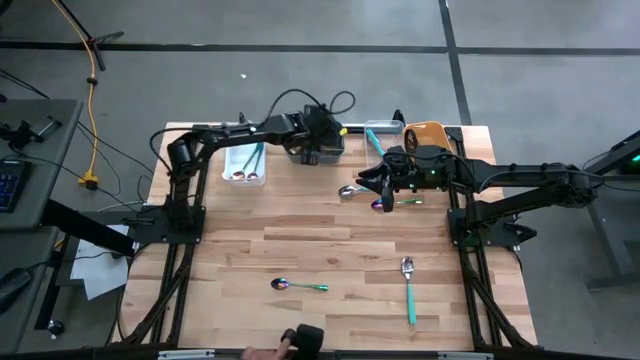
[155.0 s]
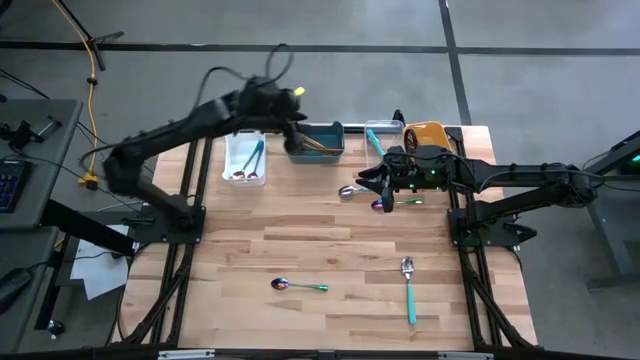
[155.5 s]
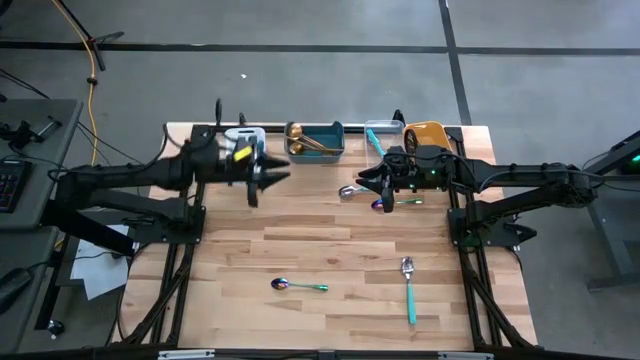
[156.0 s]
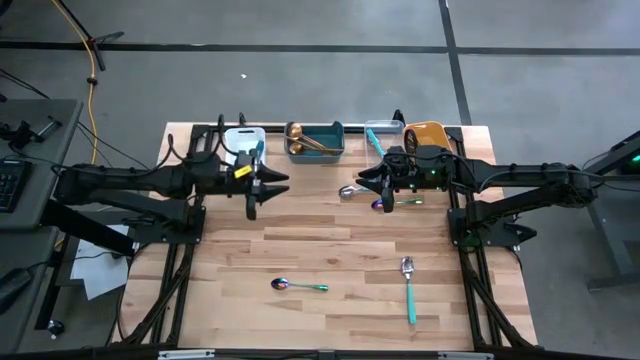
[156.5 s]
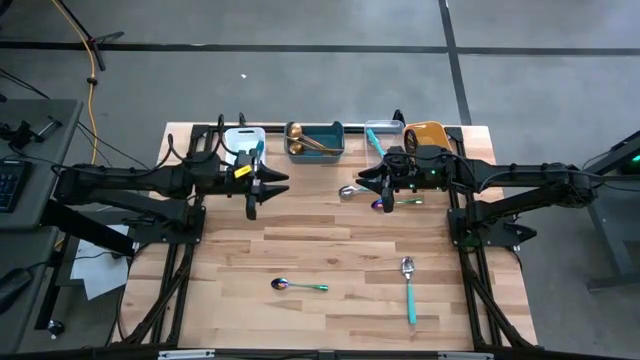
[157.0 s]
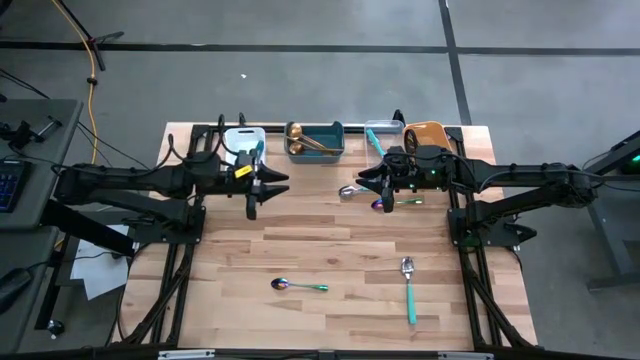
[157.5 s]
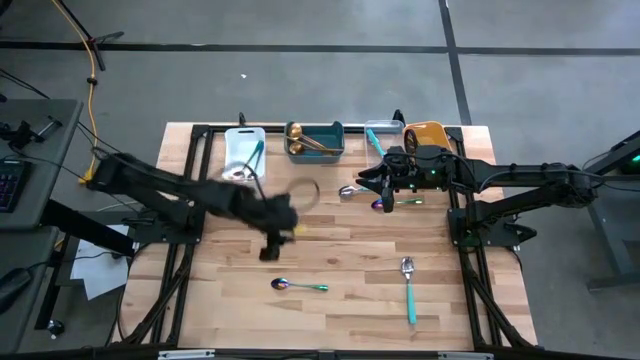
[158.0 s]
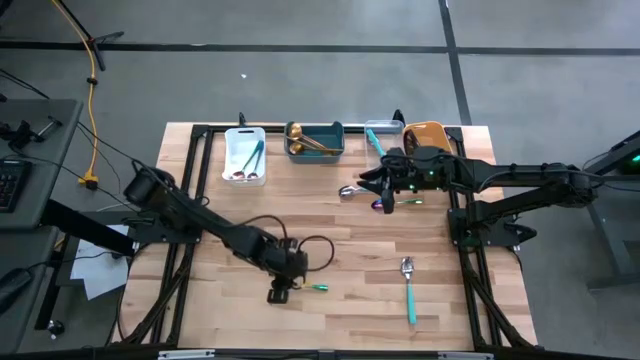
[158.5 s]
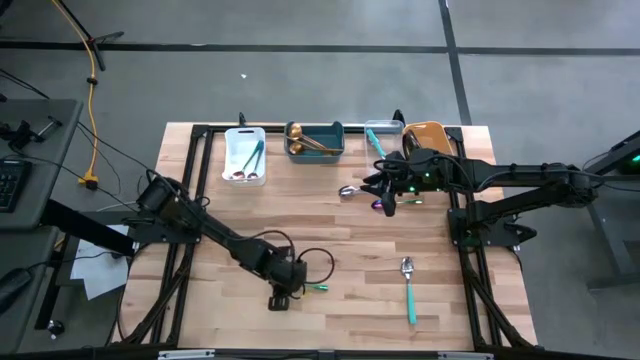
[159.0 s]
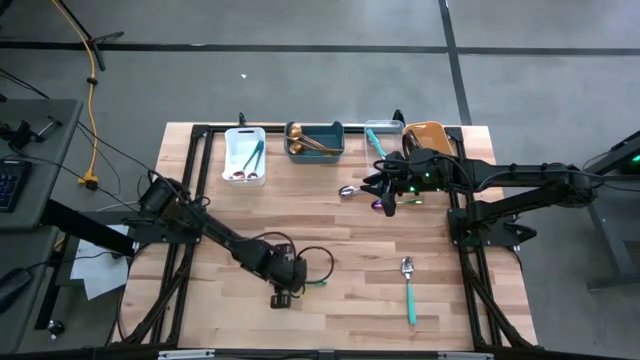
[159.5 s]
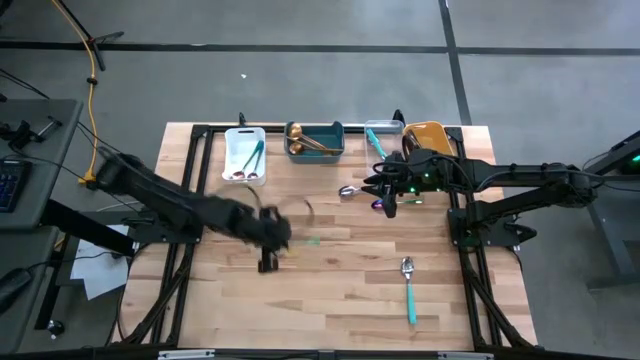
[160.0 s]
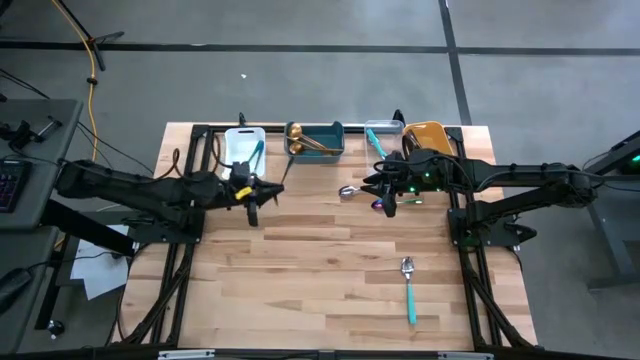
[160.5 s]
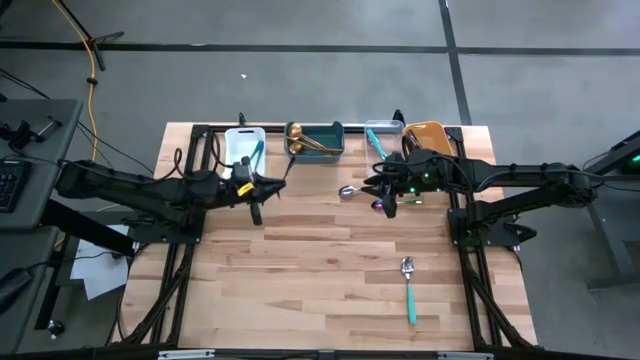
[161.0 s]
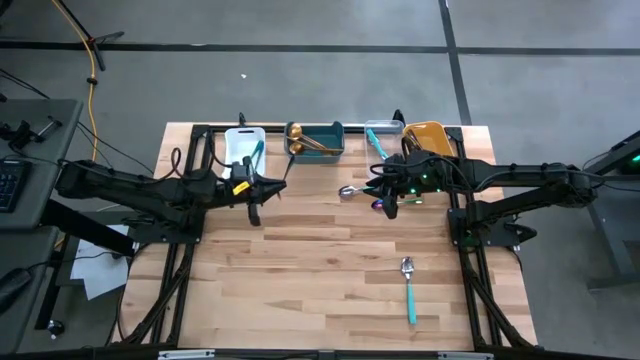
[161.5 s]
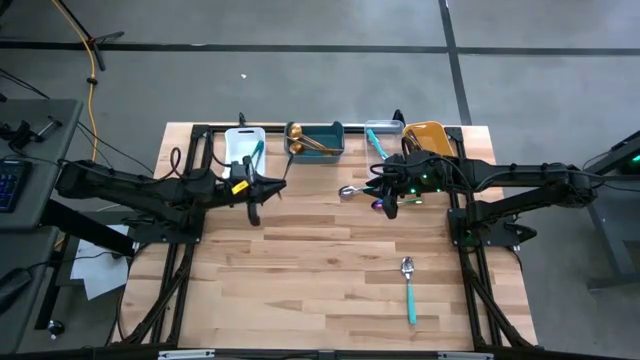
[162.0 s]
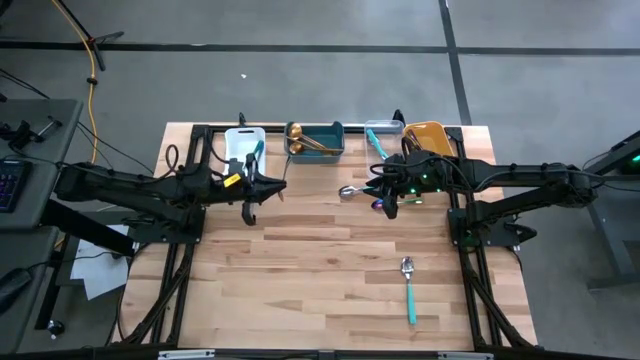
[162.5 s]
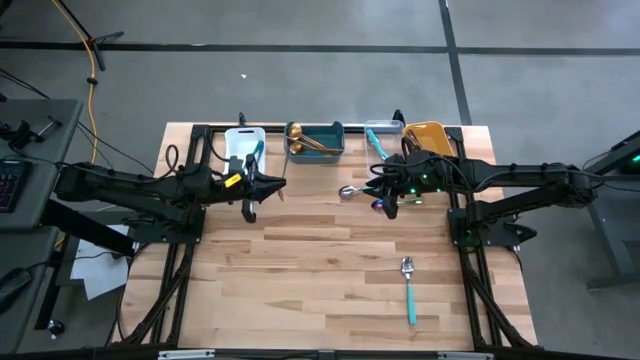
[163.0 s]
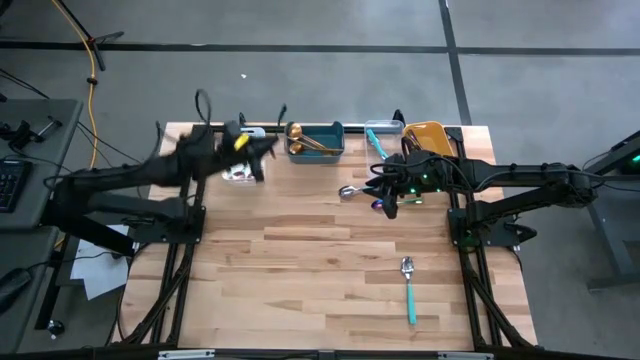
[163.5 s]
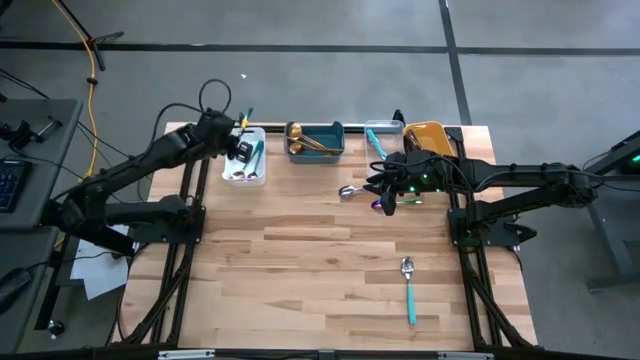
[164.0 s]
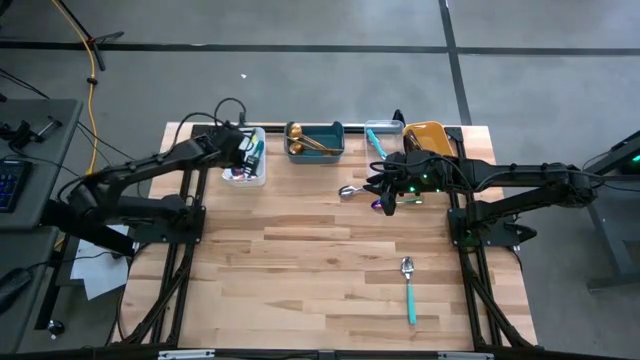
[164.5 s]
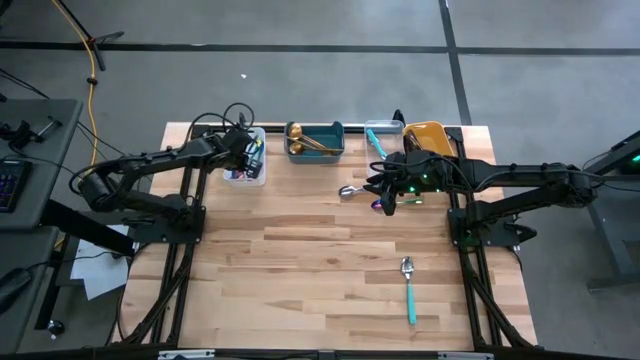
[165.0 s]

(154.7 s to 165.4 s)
Task: Sort silverware by color (type)
Put the green spoon into the white bin

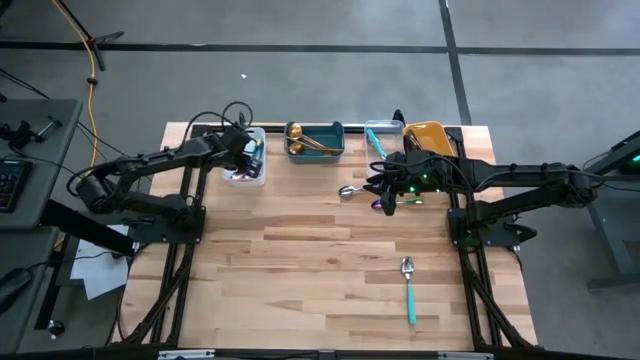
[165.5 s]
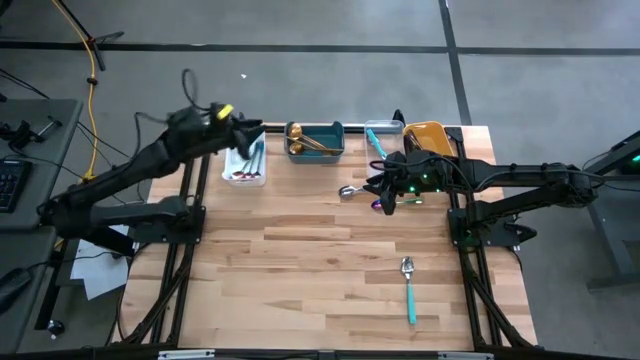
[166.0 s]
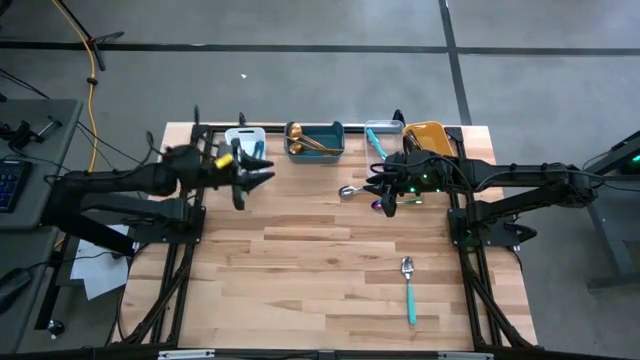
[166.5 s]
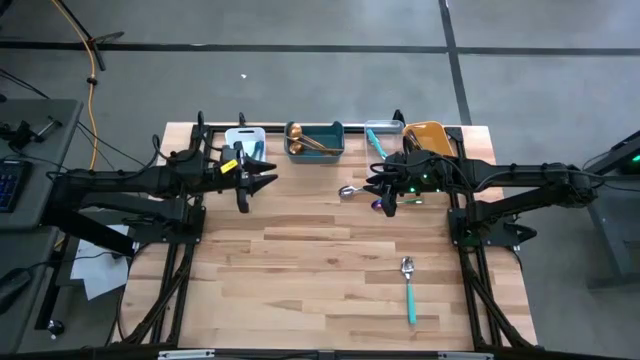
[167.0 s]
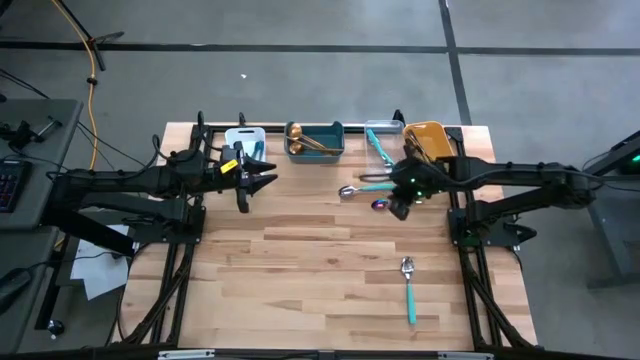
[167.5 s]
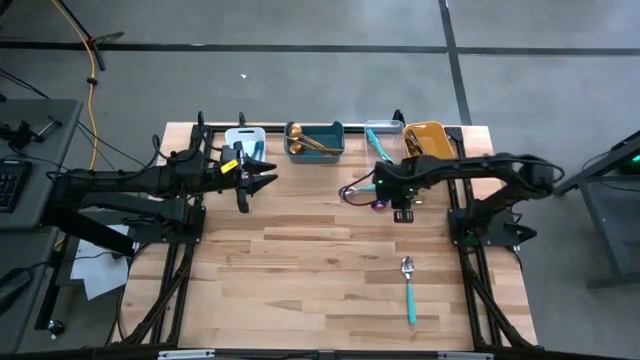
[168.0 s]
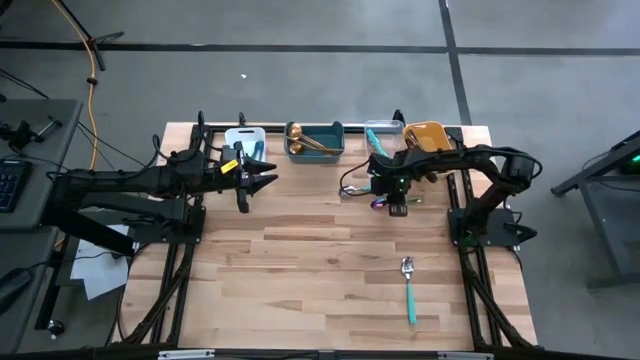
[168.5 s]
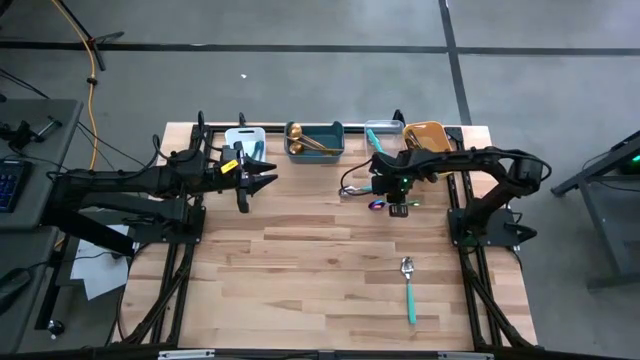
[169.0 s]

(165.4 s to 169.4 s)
Put the green spoon into the white bin

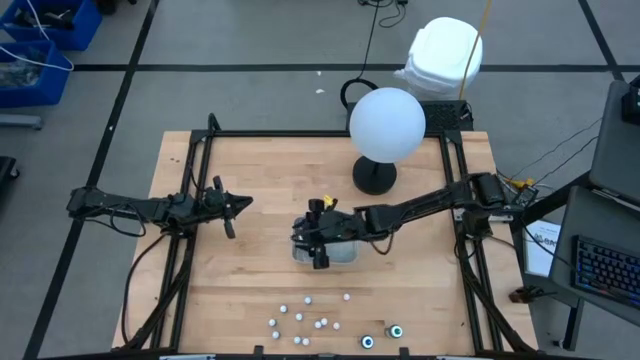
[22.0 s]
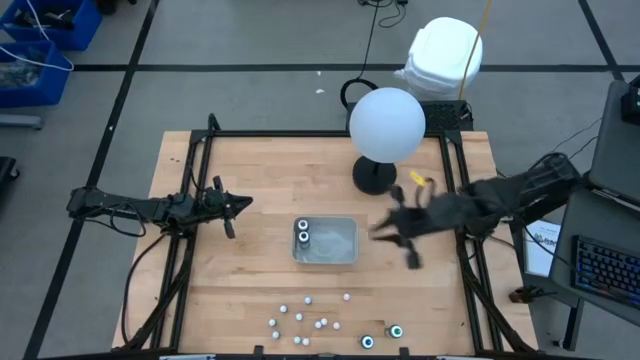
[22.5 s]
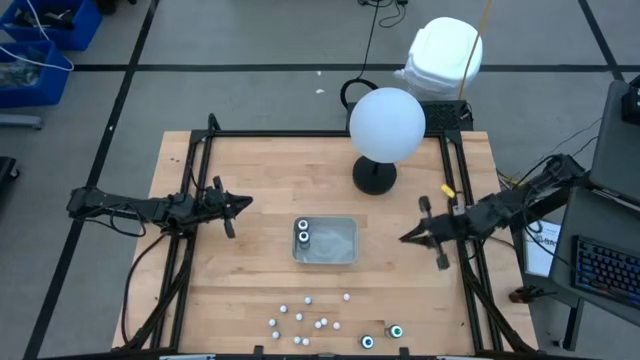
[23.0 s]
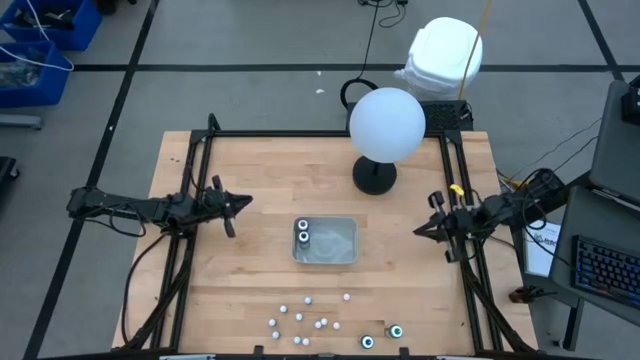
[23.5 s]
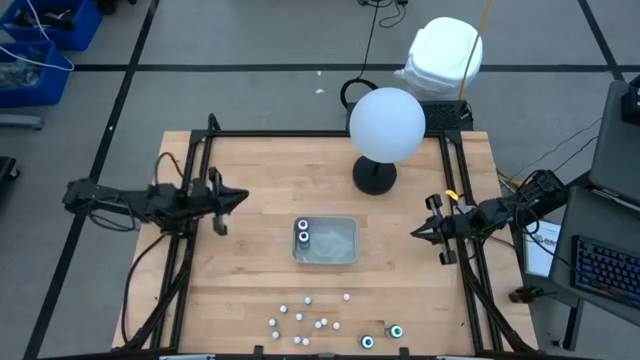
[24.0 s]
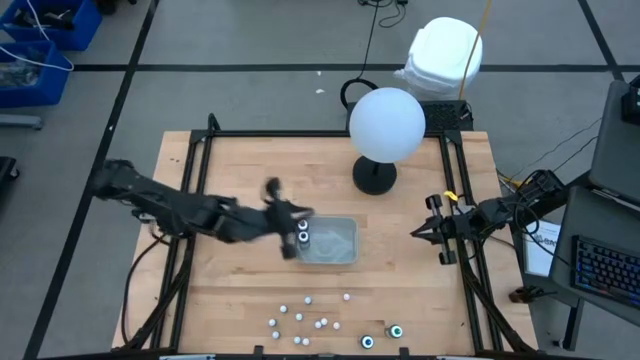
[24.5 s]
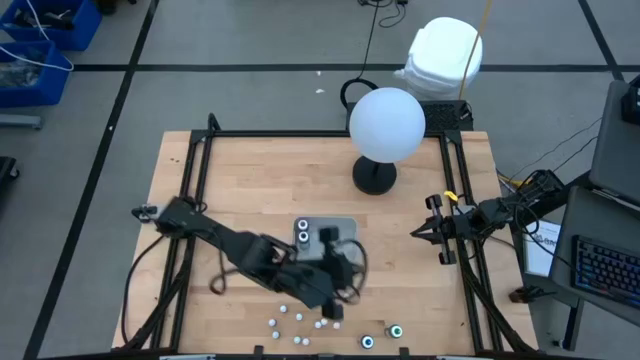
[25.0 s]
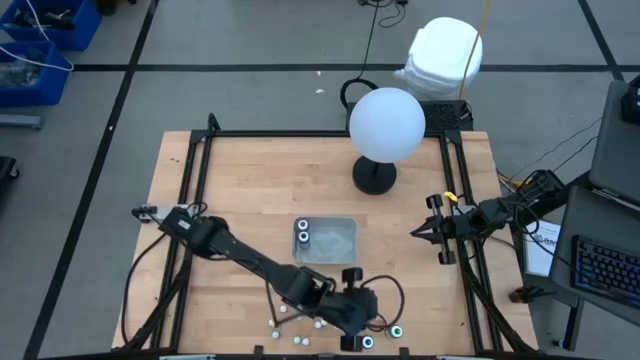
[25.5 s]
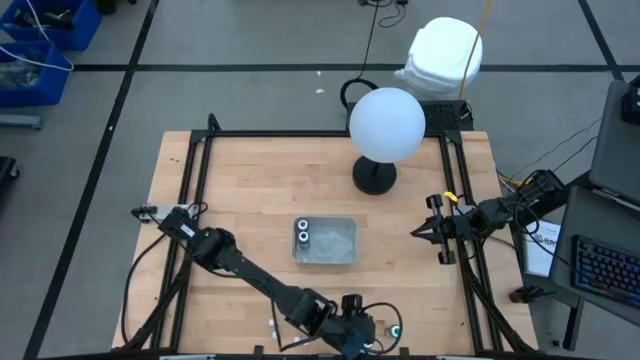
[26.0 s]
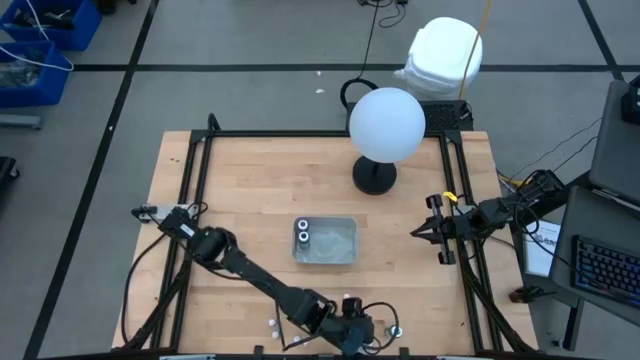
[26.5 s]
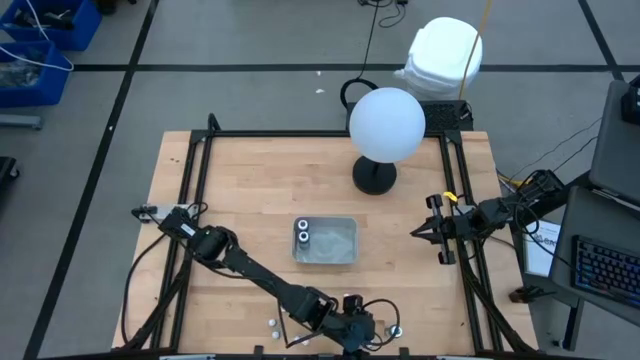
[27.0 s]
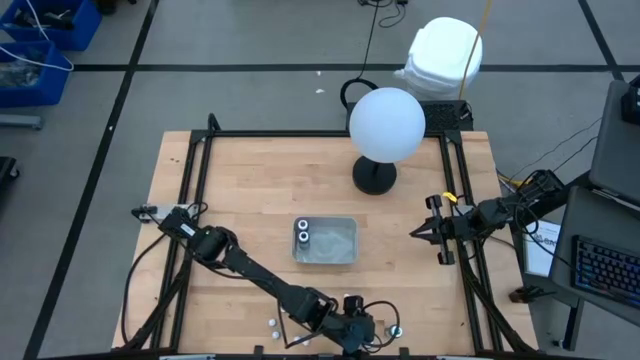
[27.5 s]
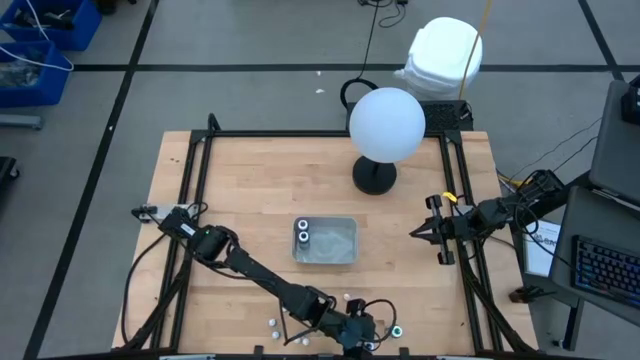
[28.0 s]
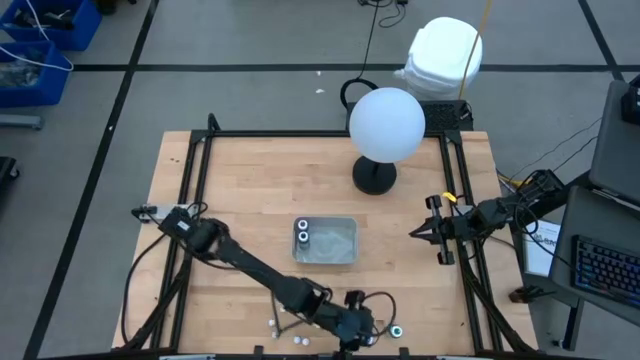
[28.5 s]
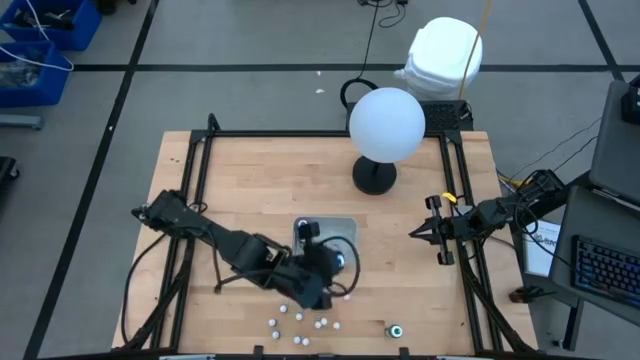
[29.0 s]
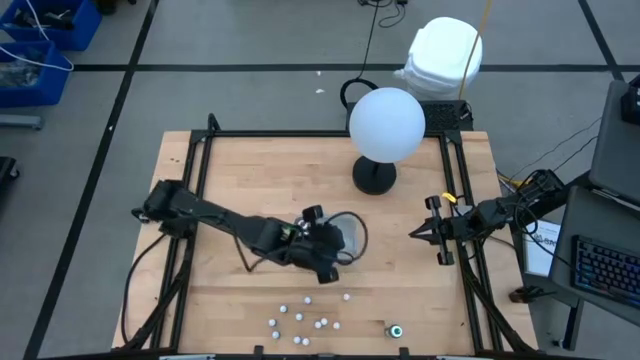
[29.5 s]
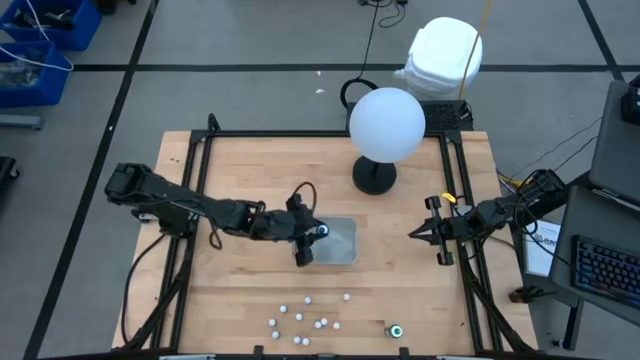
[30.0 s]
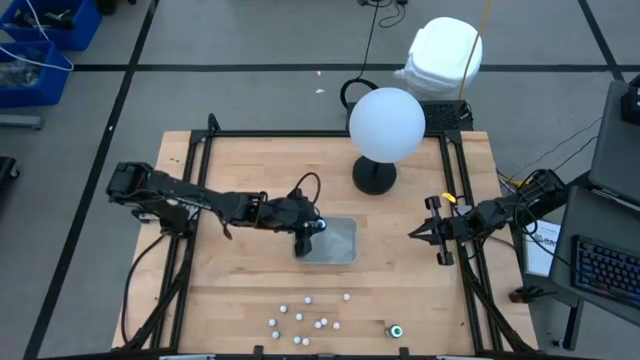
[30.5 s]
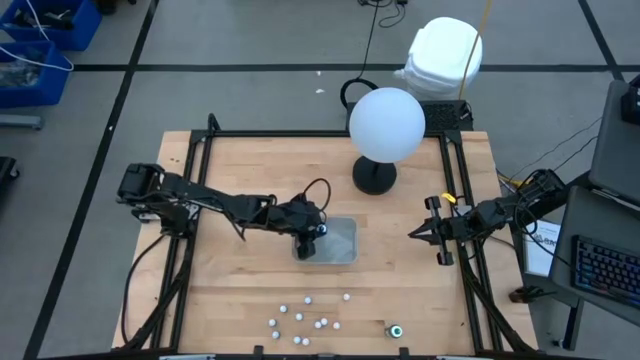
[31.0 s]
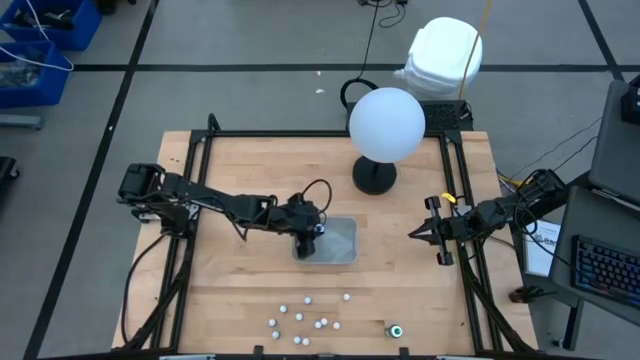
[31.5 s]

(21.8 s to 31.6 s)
Task: Pick & Place food coloring
Put the large blue food coloring bottle into the gray bin
